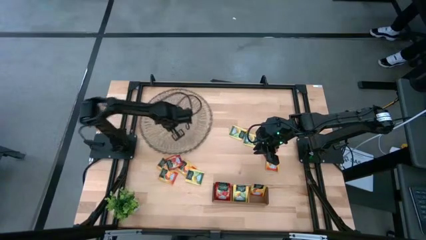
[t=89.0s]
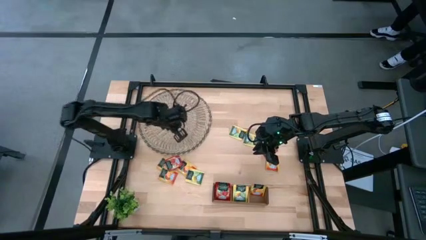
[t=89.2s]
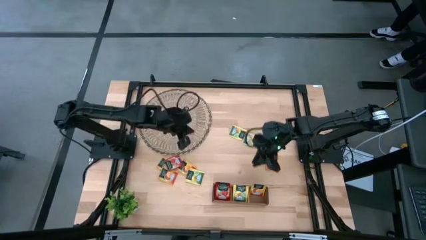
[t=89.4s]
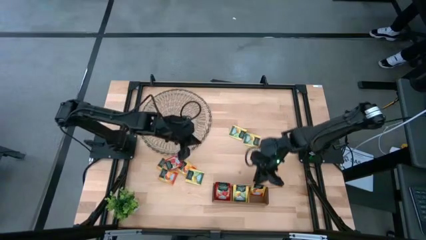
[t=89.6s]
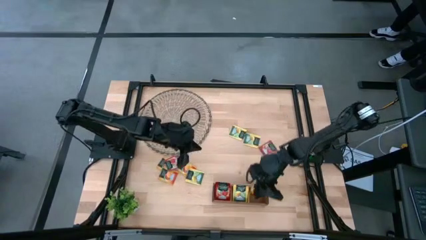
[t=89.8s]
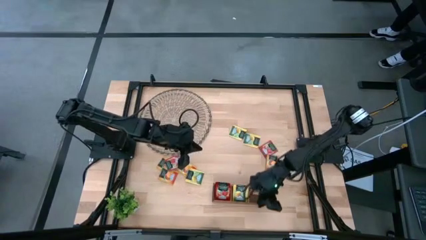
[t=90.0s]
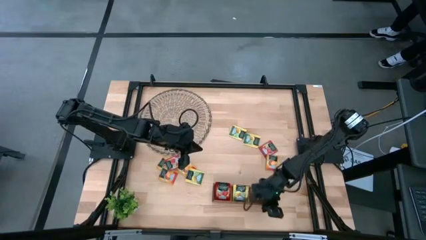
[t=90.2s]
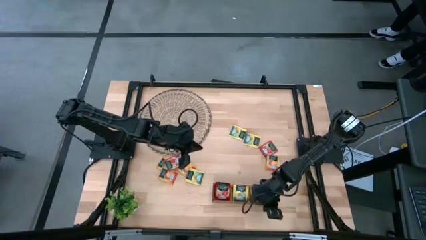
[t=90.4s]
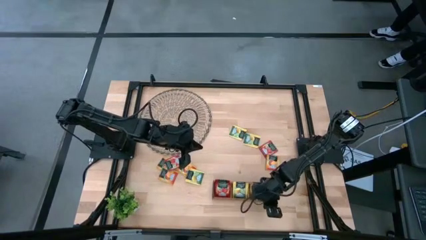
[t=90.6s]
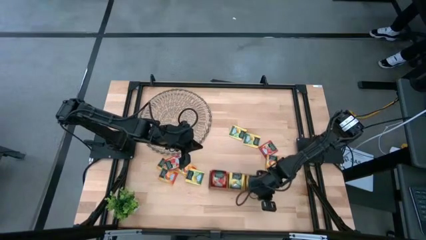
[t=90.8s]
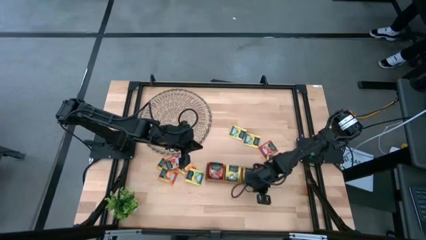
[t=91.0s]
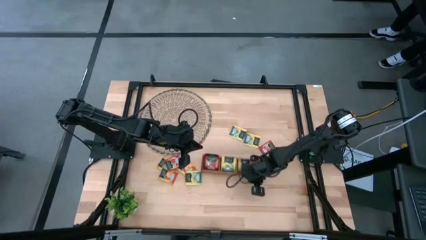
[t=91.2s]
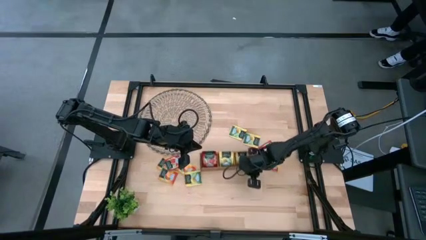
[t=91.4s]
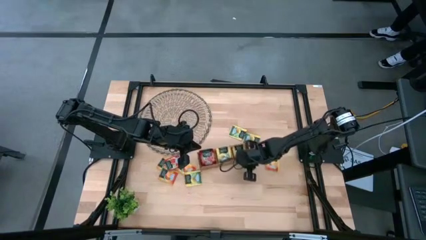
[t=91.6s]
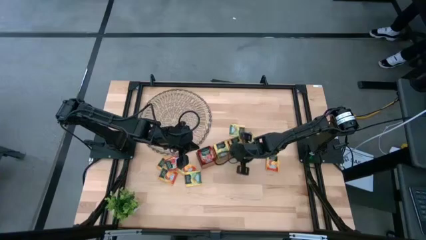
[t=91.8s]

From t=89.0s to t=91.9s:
Task: Pick & Place Tea
Move the wooden organizer to the center of the table

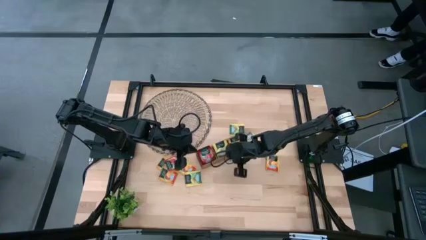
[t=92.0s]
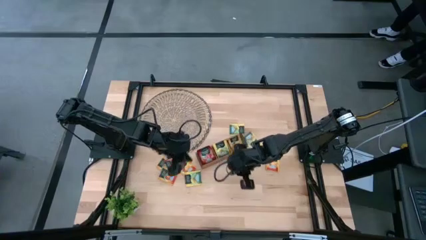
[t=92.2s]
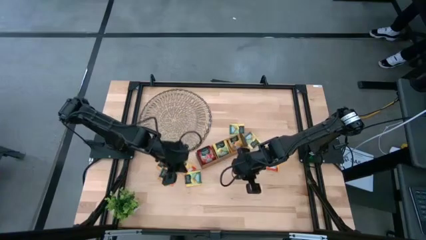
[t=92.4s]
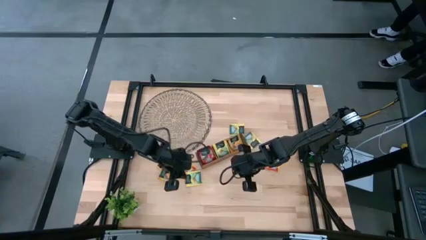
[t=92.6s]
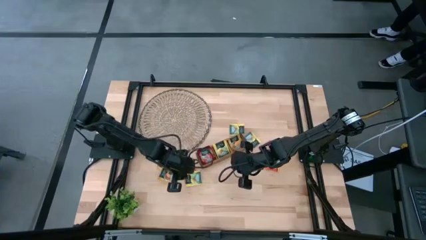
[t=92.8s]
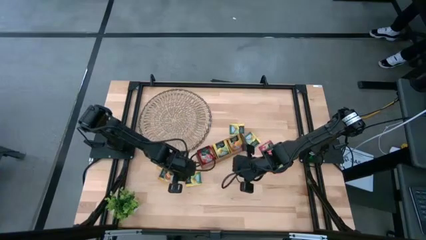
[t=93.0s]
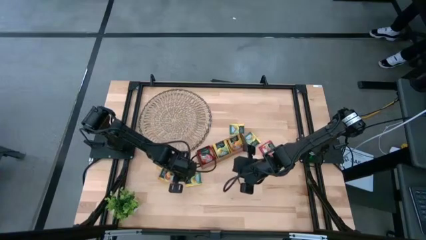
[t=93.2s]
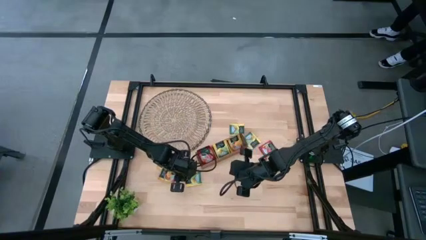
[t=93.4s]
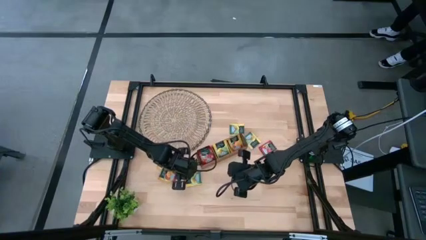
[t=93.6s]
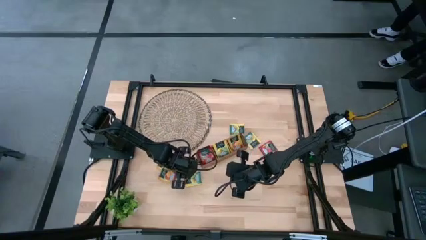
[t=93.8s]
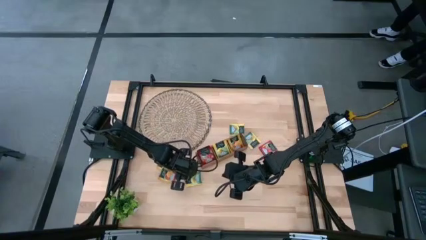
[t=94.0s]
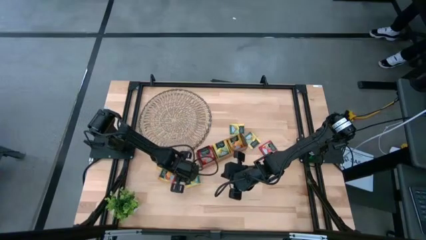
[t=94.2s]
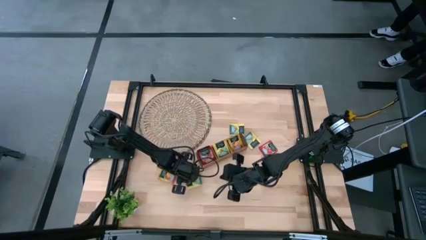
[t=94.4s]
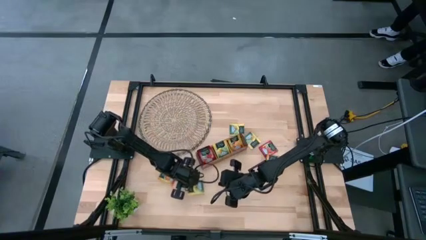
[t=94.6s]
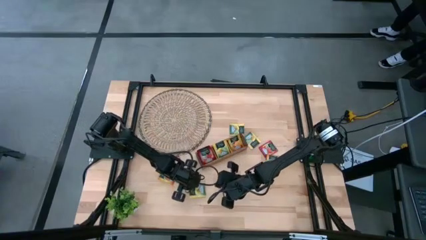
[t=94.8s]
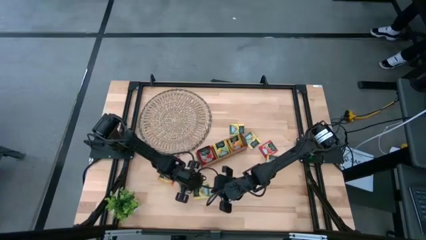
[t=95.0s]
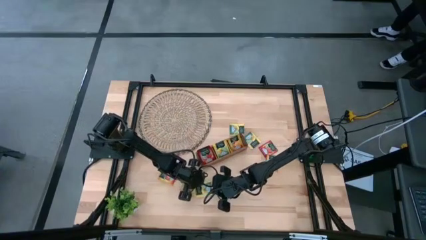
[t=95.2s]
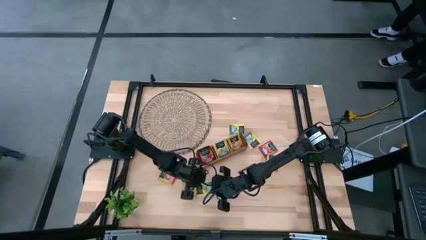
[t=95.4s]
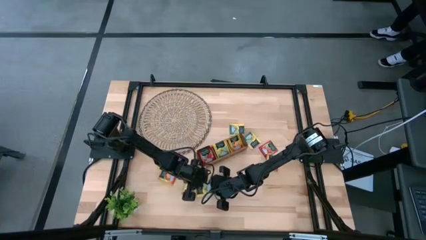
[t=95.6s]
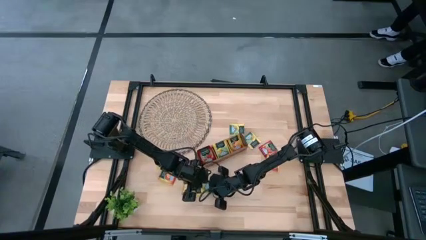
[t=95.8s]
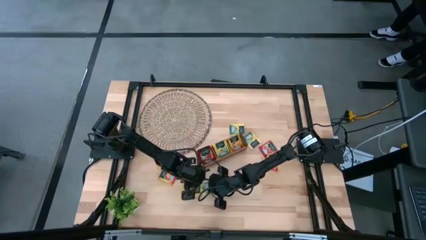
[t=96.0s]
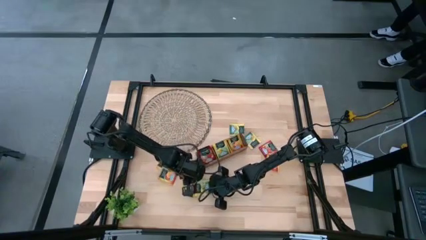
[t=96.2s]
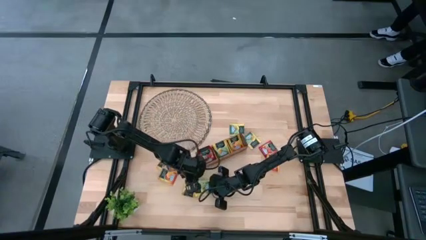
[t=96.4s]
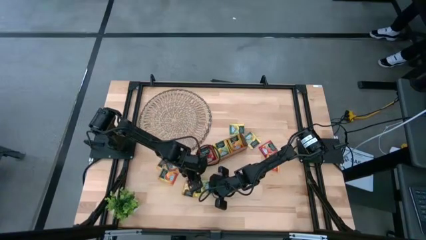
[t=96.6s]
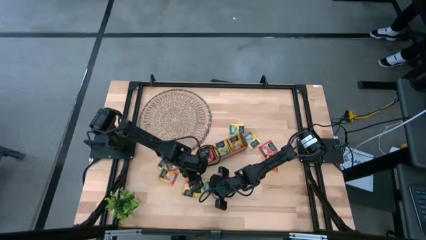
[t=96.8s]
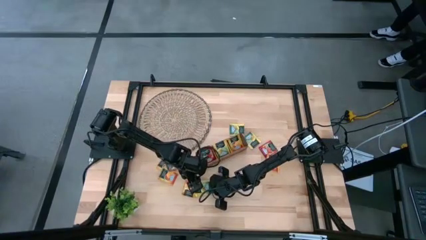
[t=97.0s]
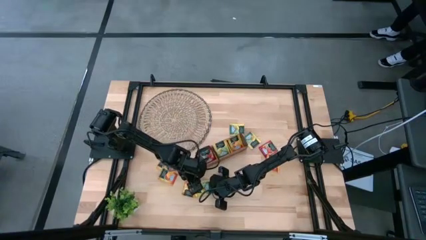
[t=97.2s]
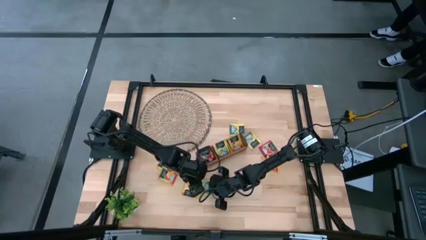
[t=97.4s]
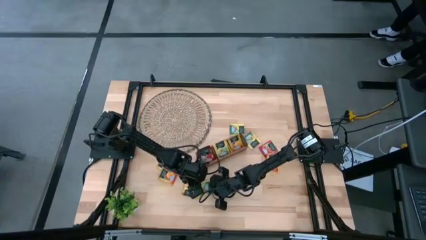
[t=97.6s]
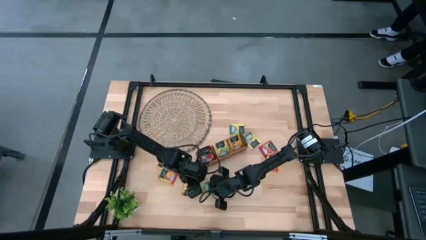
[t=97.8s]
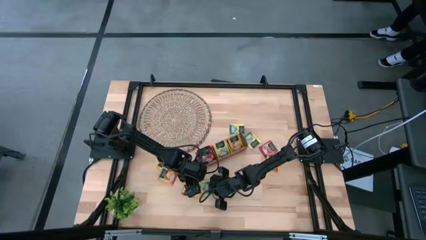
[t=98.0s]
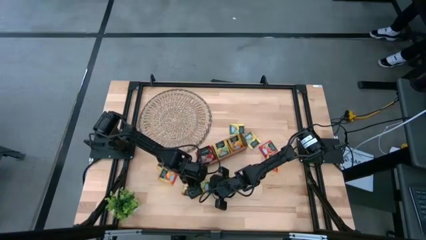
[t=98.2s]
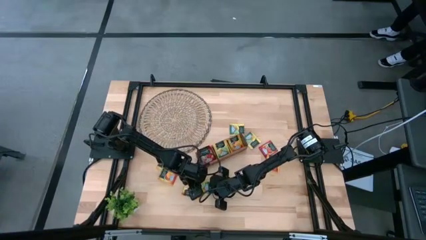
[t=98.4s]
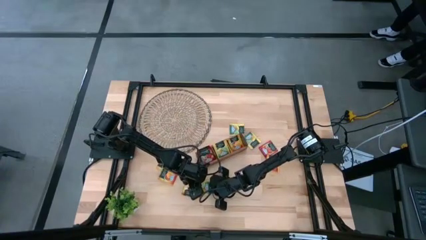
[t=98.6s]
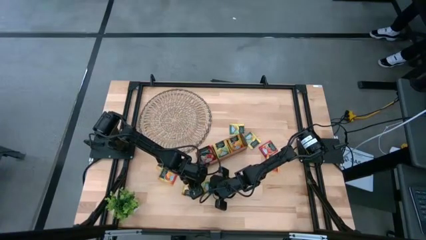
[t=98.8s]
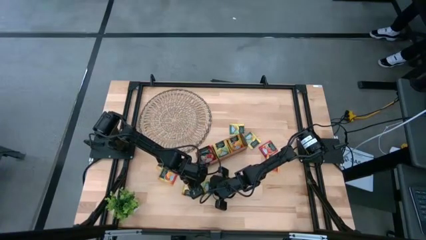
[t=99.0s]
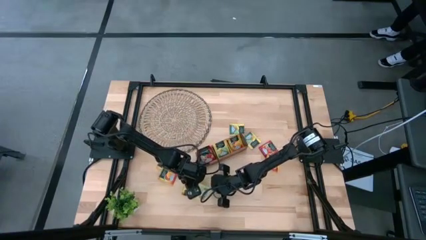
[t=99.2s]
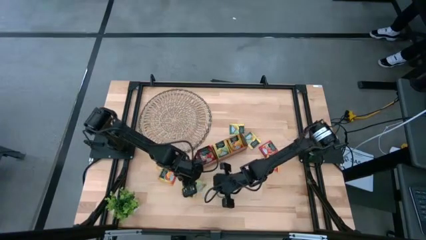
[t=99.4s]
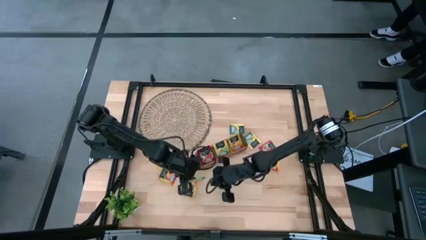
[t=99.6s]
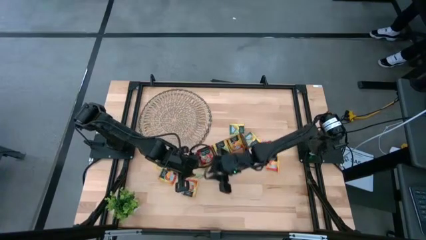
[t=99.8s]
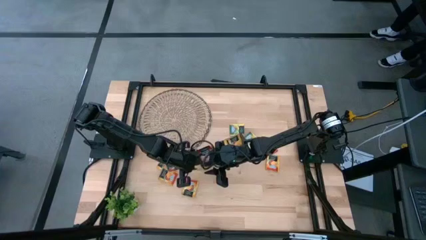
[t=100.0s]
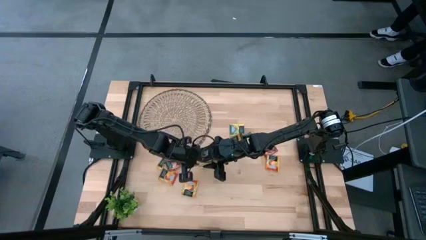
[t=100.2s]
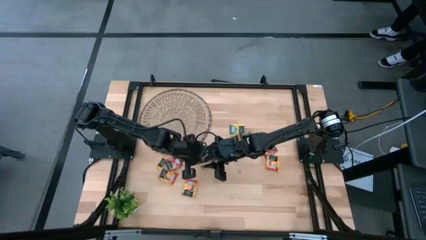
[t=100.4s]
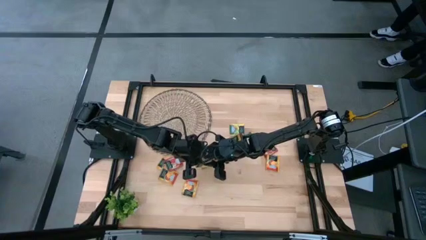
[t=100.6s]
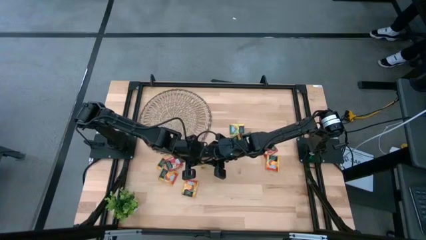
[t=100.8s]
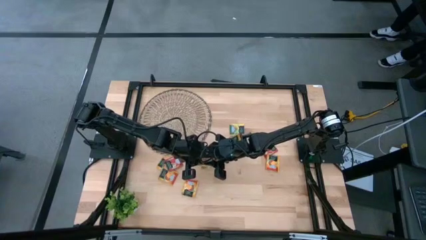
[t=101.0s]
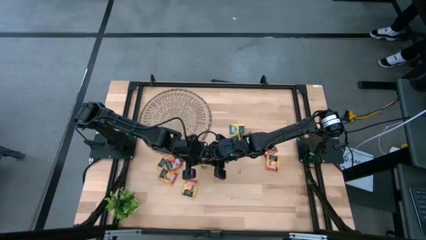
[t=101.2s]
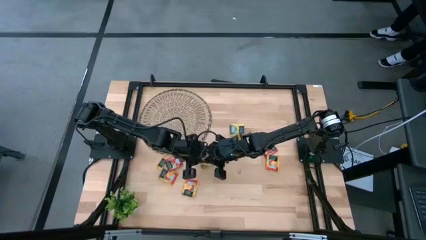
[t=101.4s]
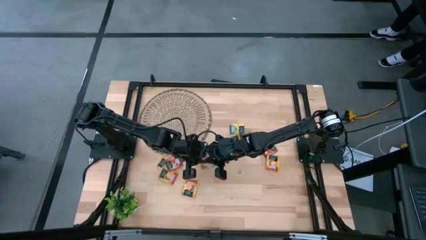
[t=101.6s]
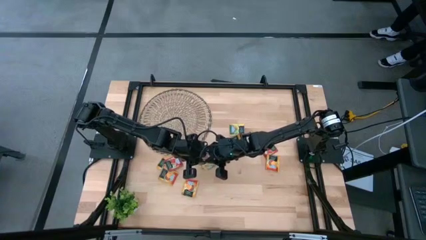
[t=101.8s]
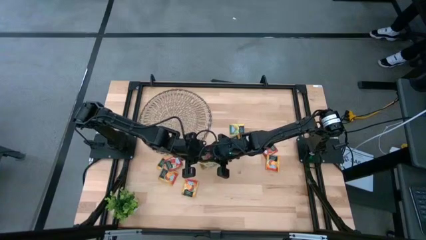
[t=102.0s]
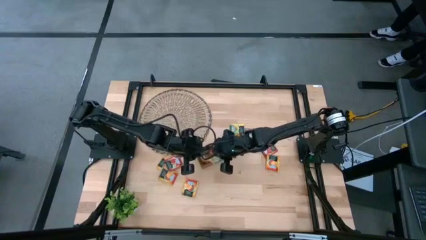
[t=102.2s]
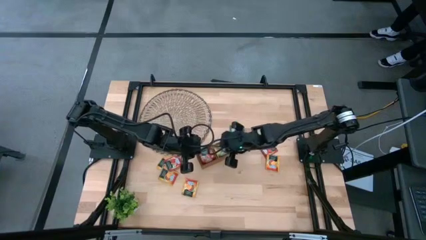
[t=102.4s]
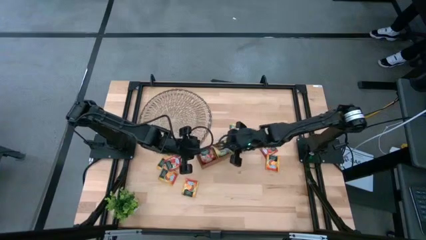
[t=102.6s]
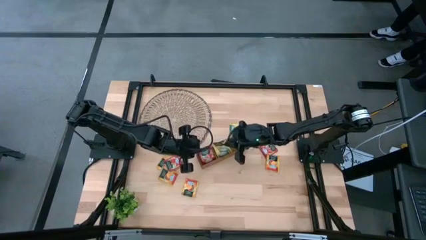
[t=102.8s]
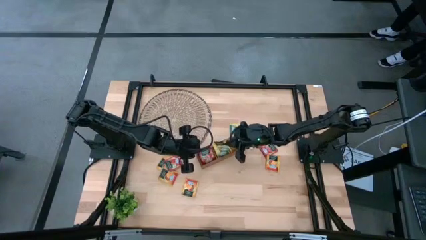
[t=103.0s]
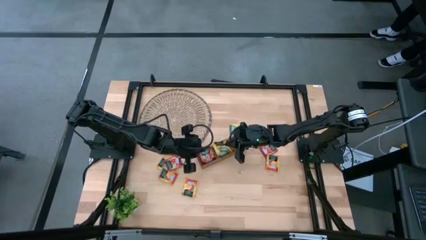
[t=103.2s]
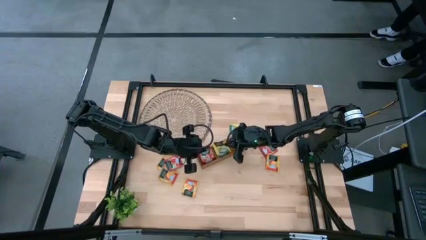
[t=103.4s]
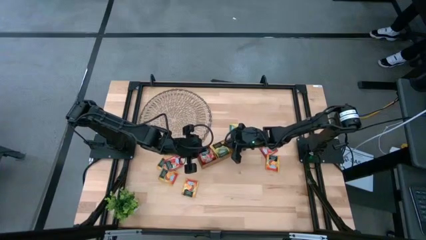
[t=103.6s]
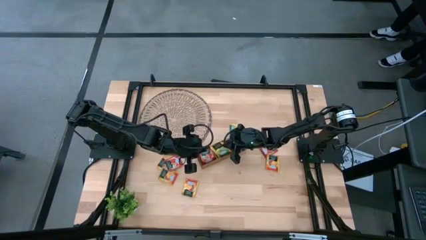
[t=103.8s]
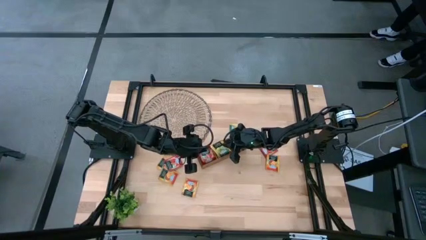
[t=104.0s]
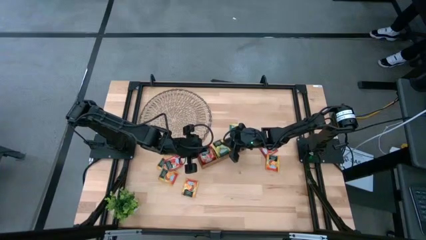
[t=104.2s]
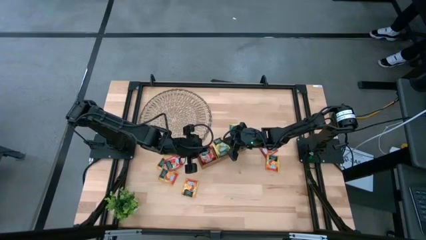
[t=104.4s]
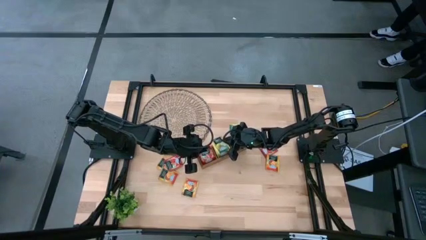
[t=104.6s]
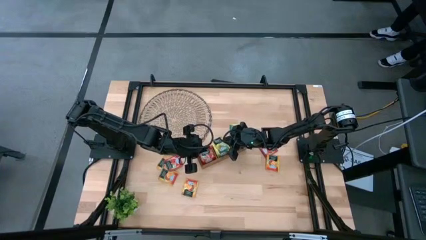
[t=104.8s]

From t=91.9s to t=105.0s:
Put the yellow tea bag into the middle section of the wooden organizer
